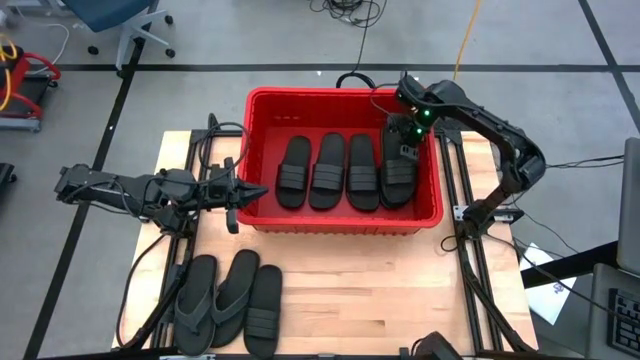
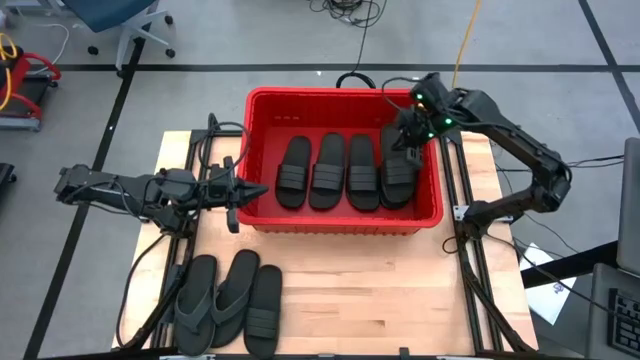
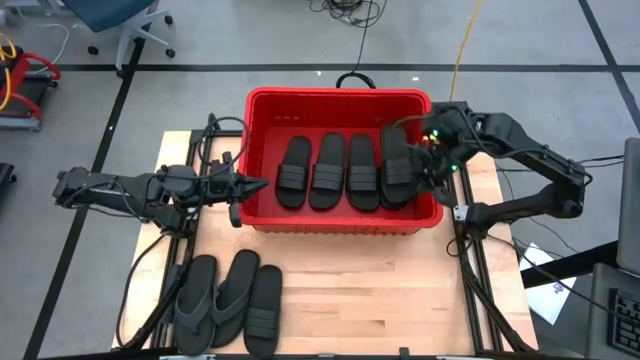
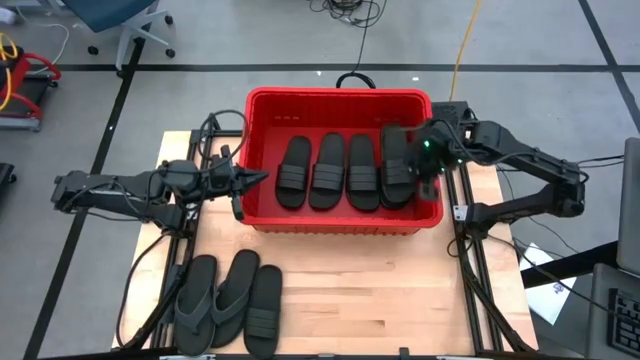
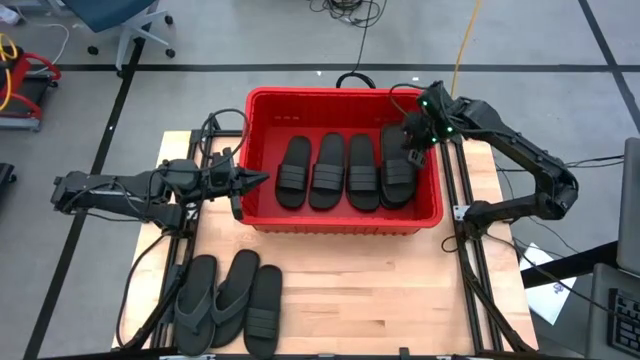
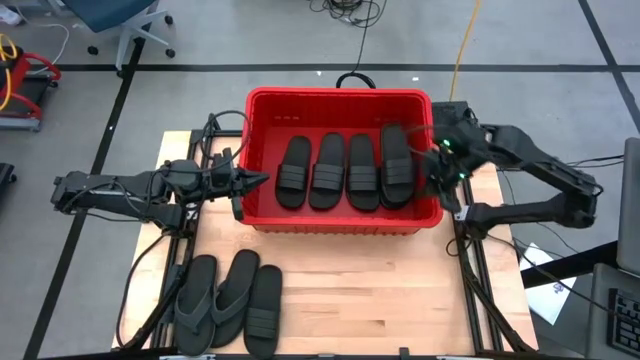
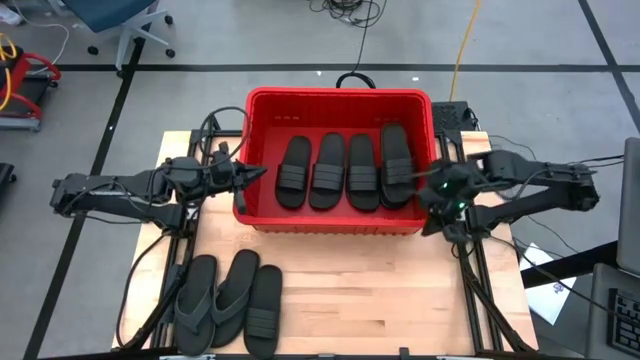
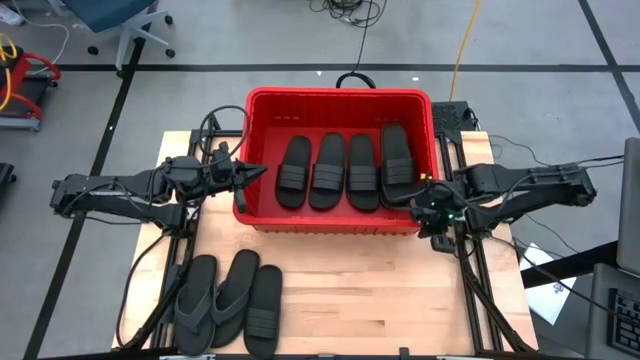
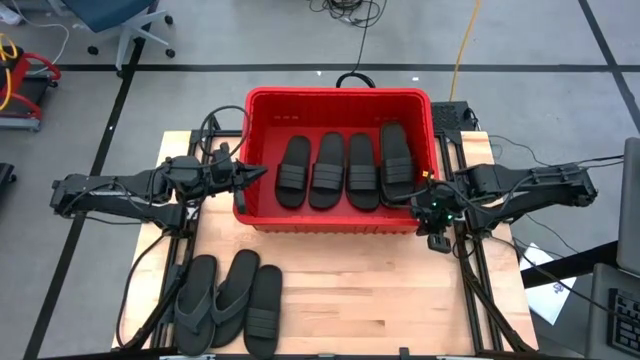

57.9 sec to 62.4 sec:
Task: Pick and place slides into bin
Adjust the red bin on the table

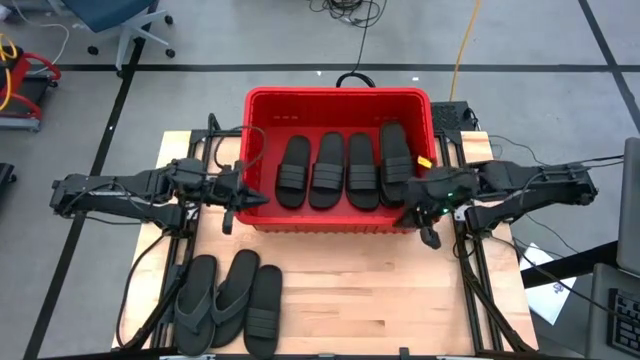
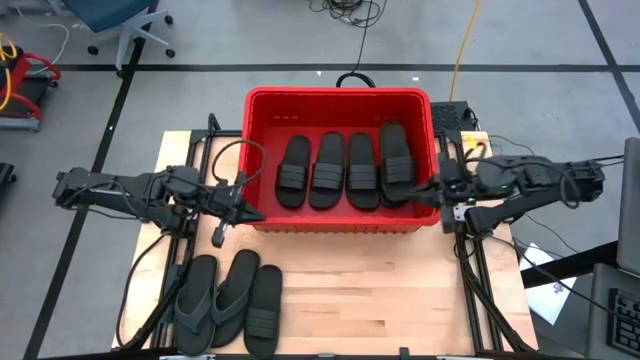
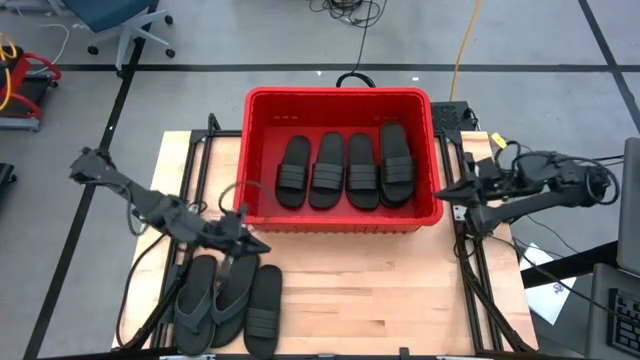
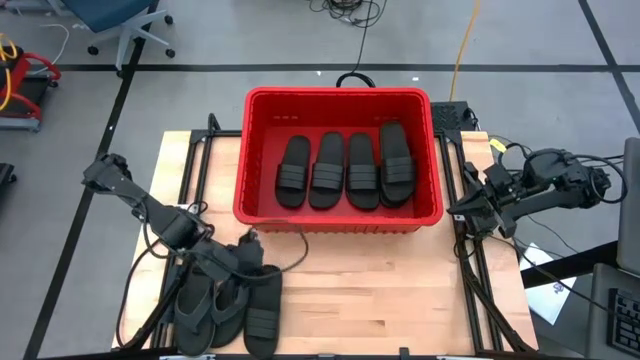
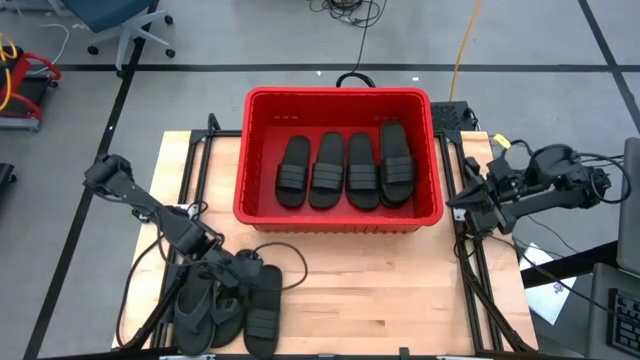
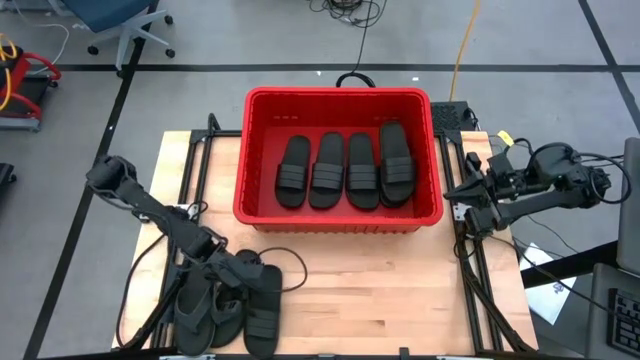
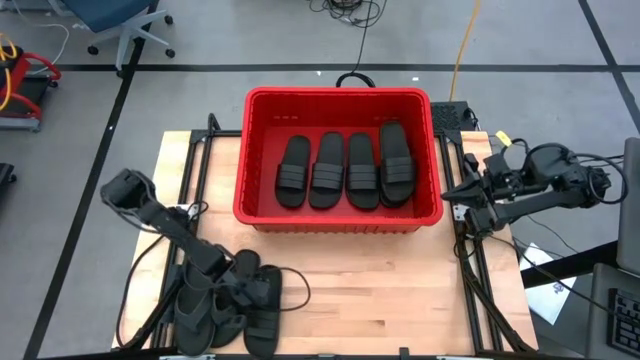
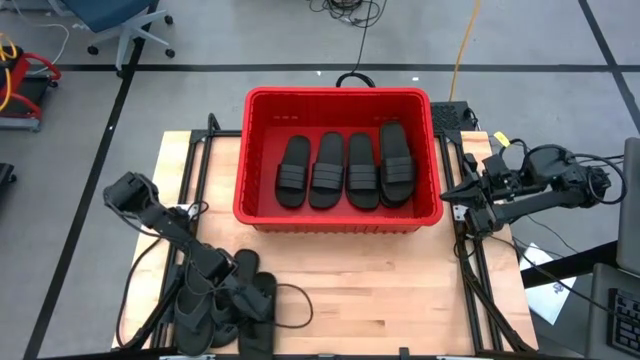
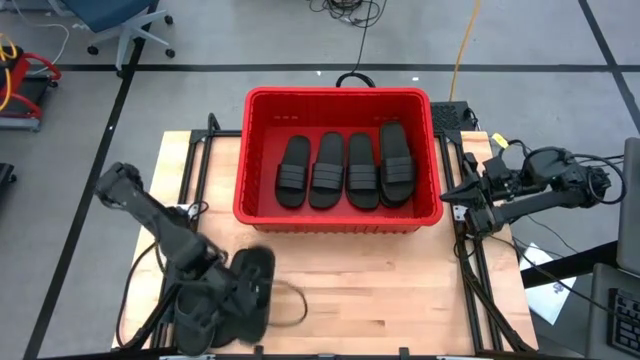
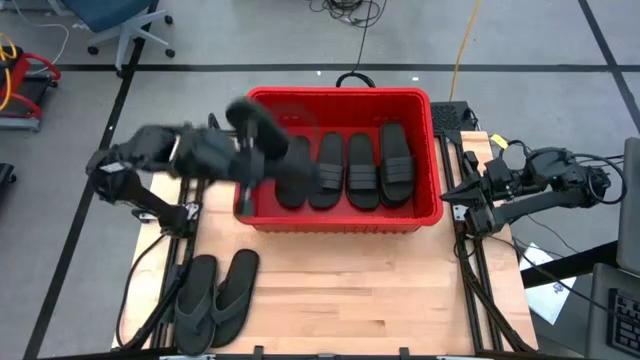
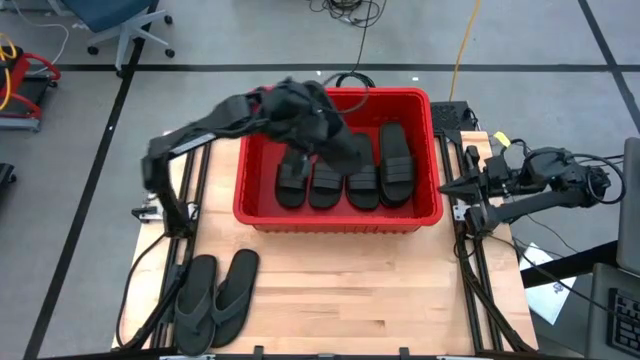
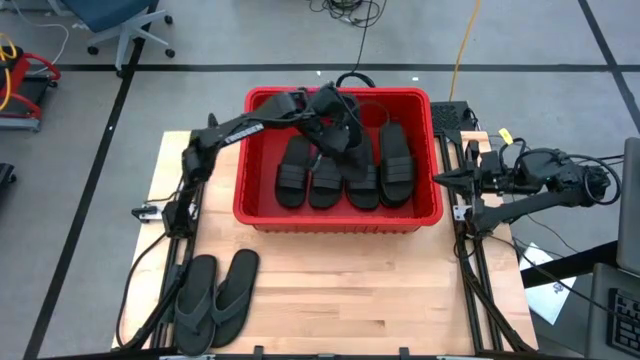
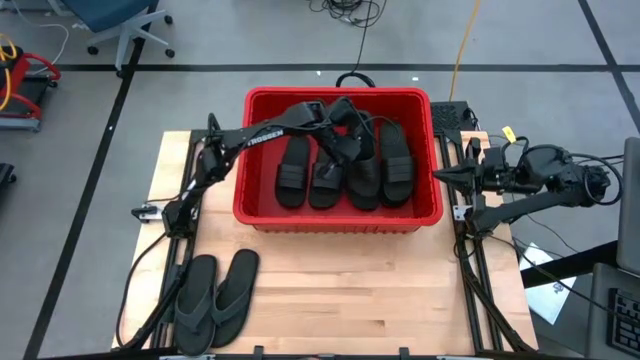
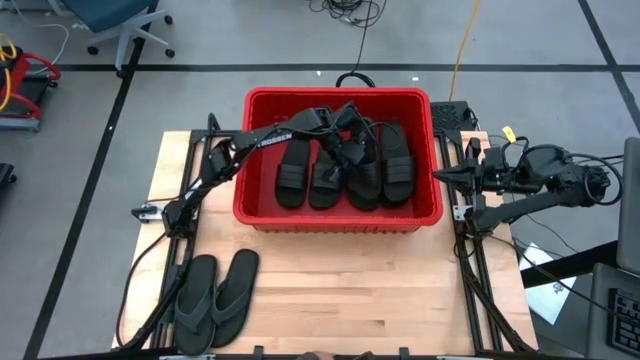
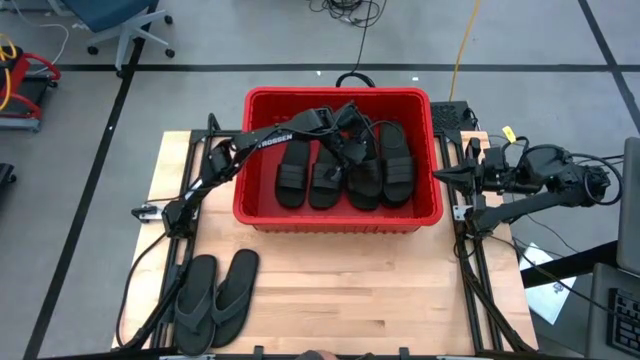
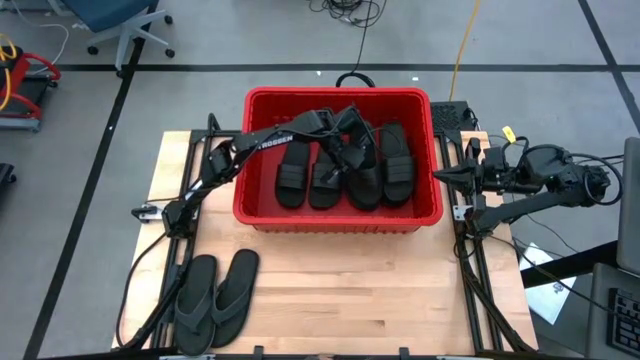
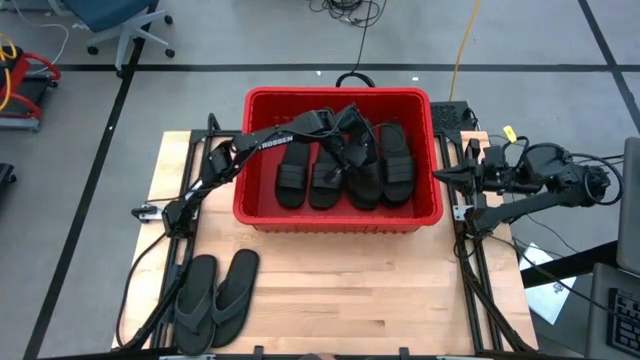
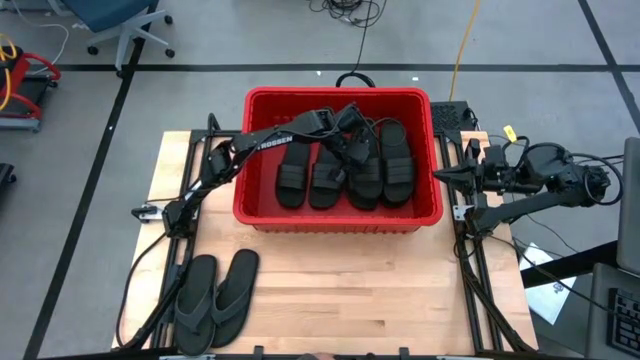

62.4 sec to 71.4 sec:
Put the black slide into the red bin

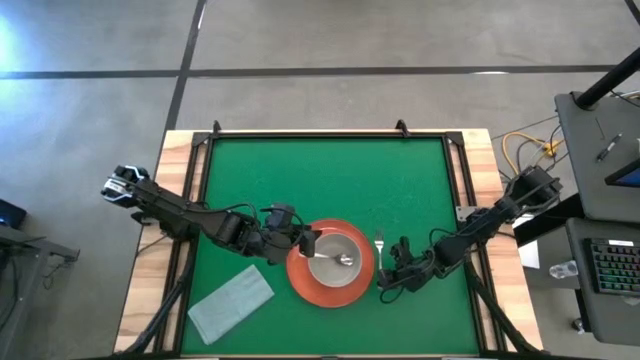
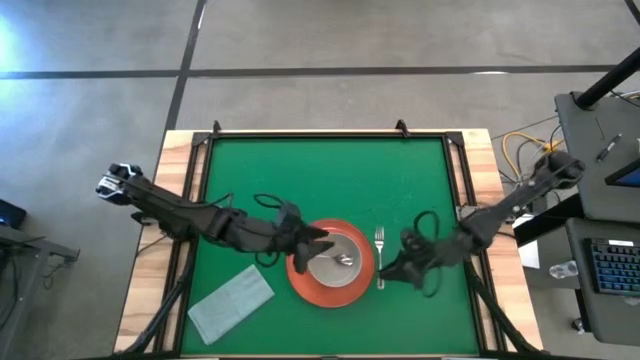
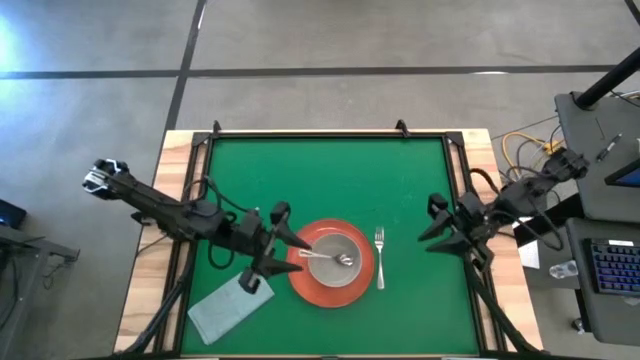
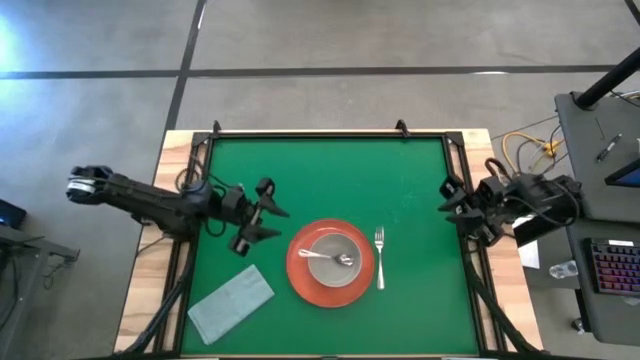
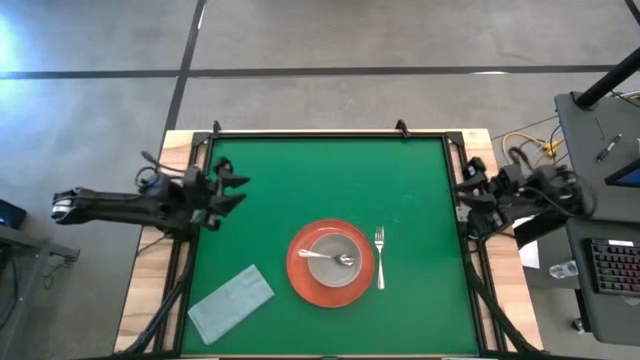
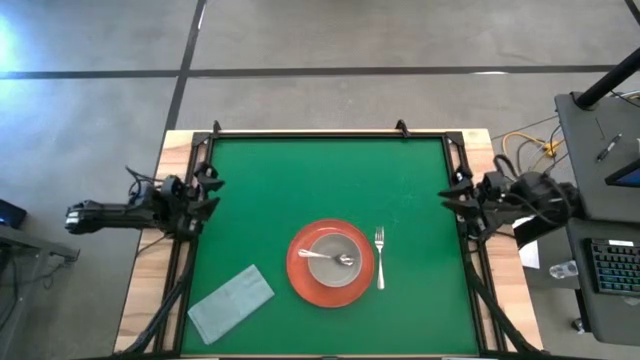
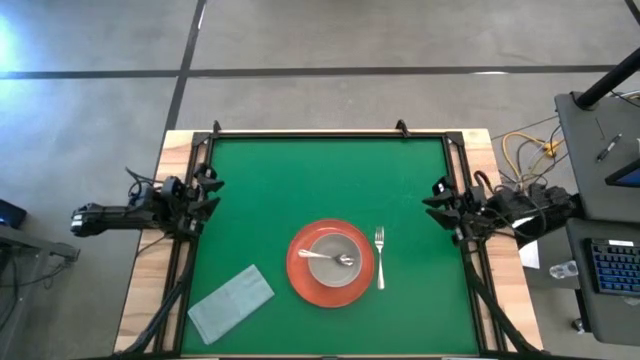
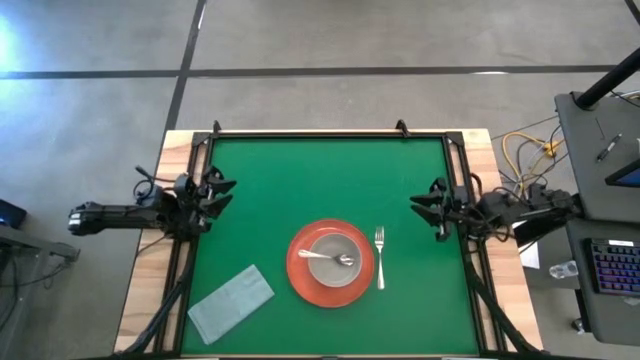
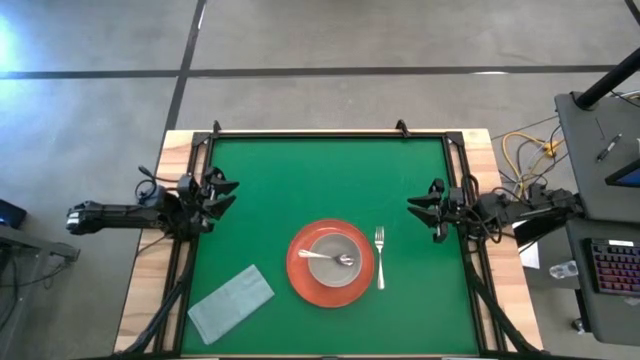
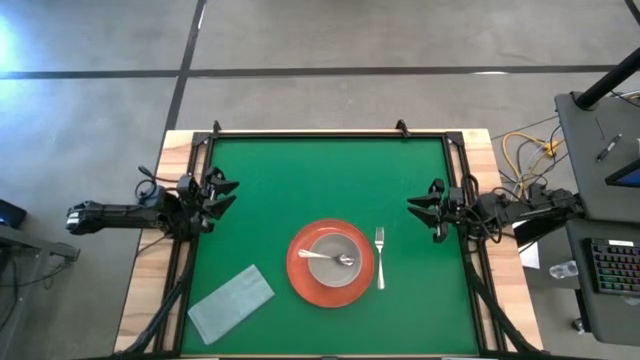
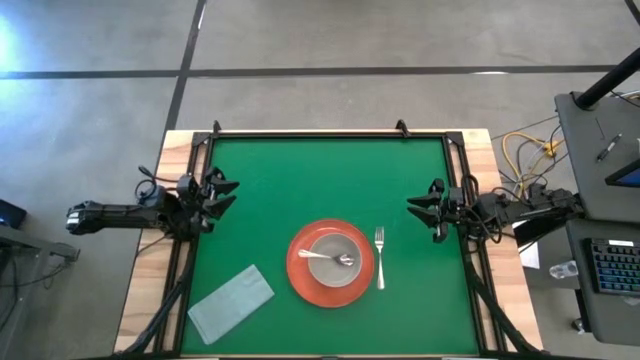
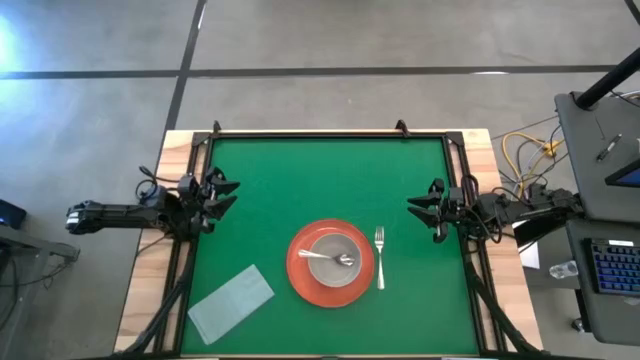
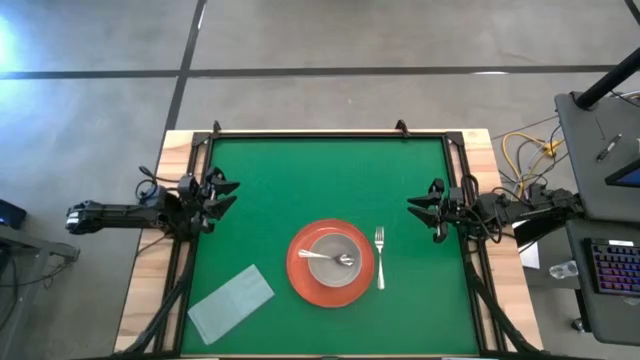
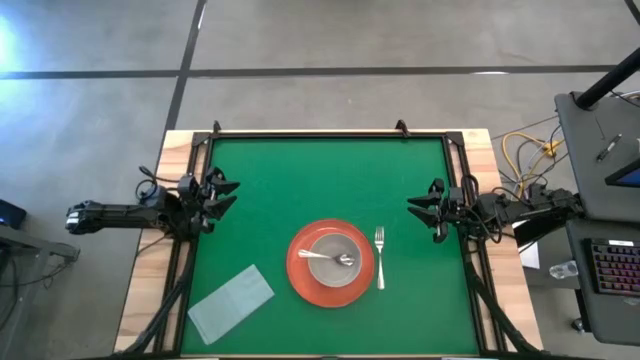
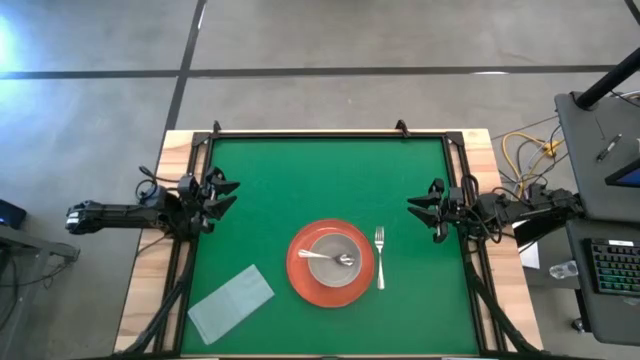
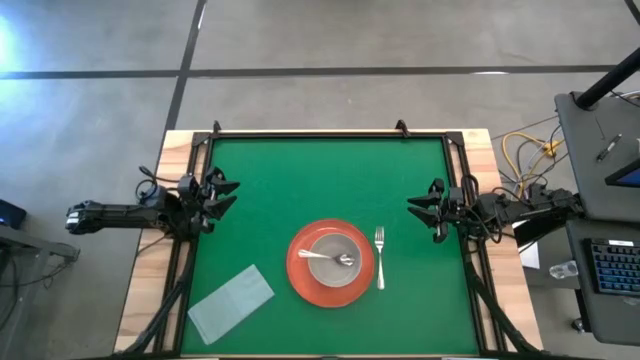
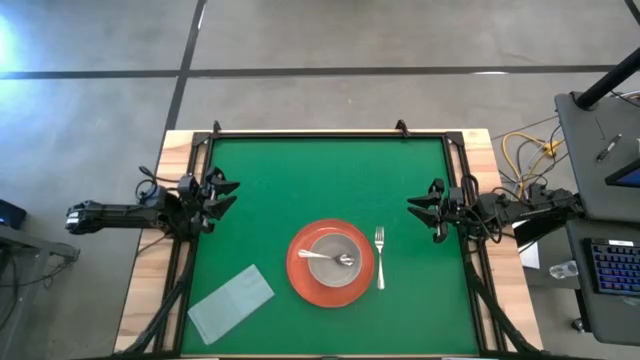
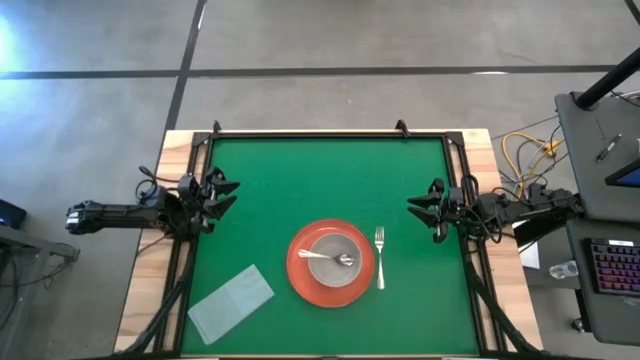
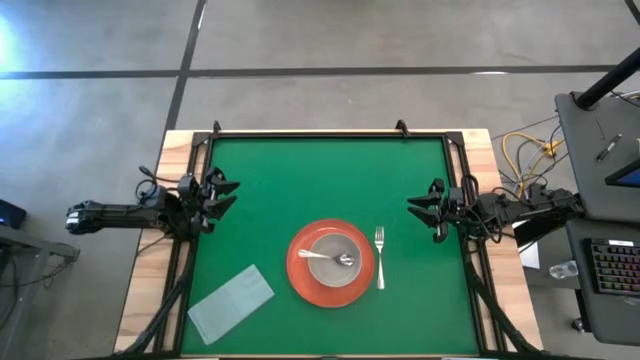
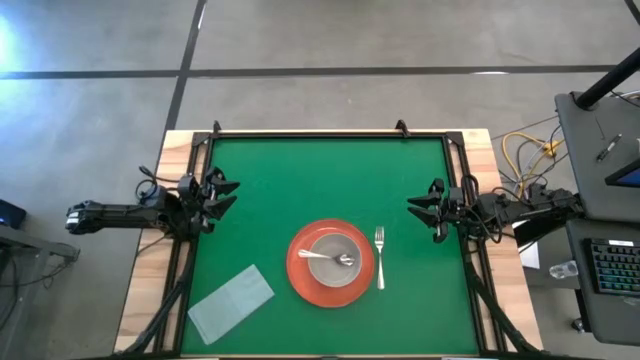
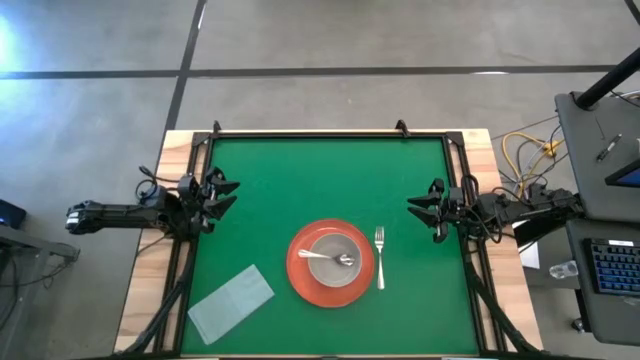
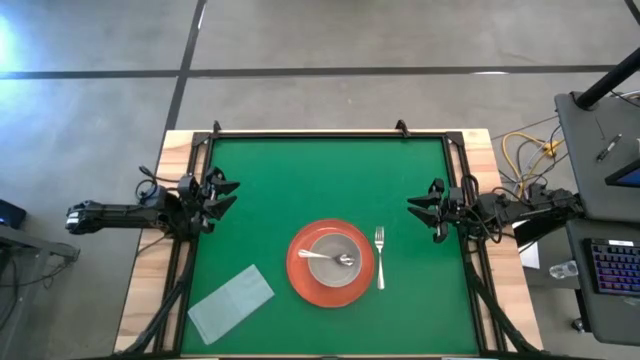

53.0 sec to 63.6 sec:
Task: Set table place
Return to Home Position
